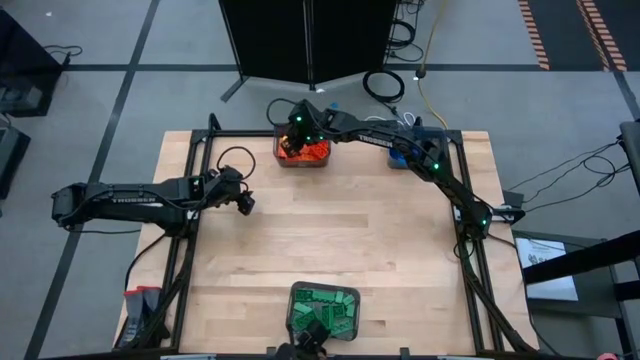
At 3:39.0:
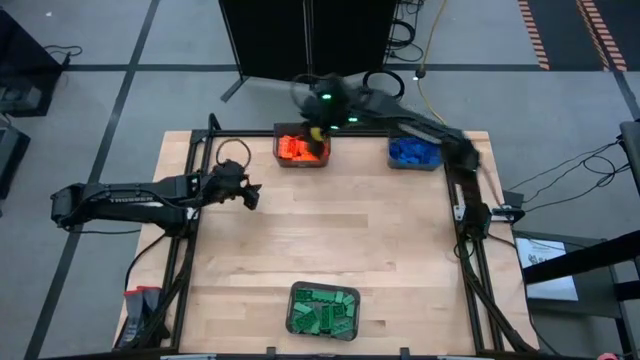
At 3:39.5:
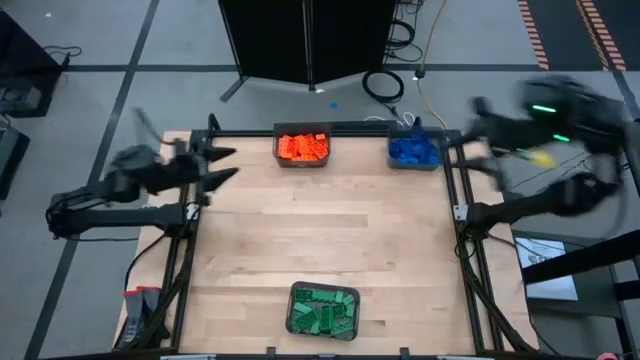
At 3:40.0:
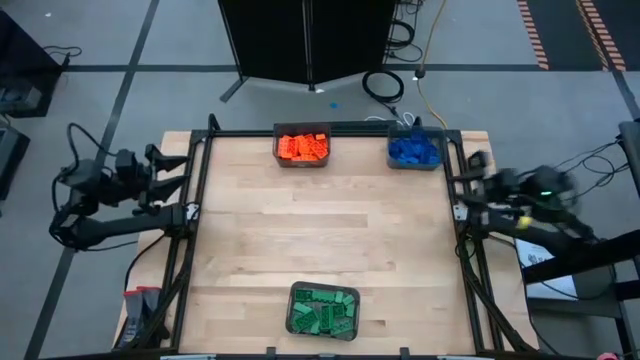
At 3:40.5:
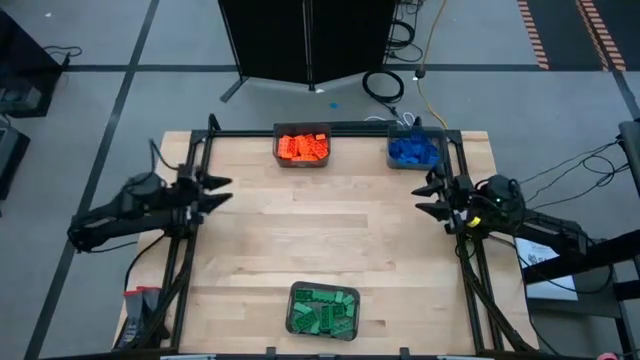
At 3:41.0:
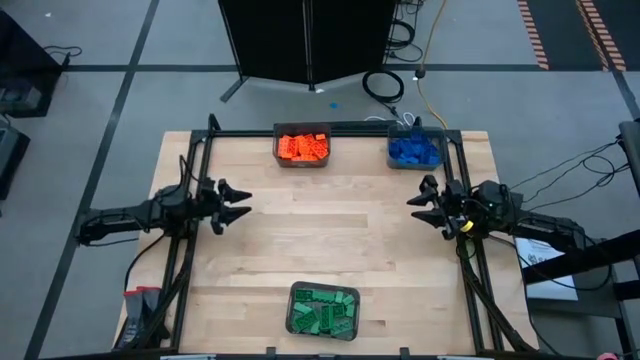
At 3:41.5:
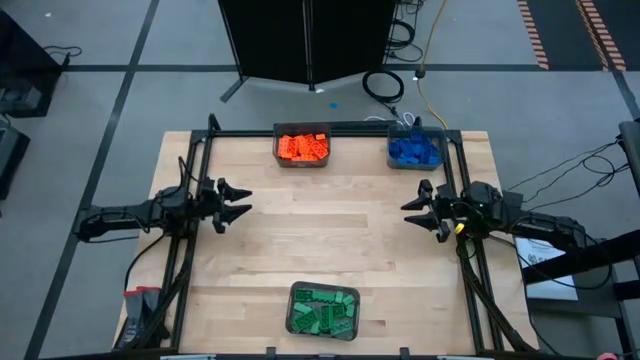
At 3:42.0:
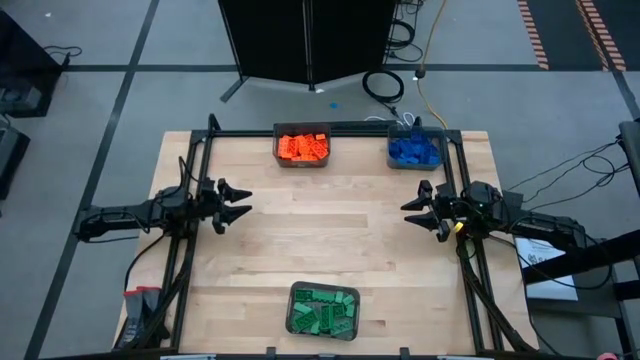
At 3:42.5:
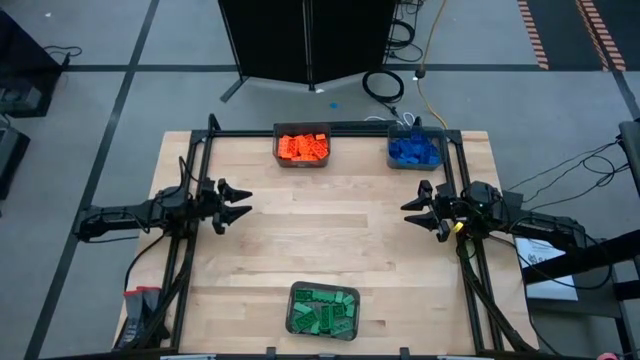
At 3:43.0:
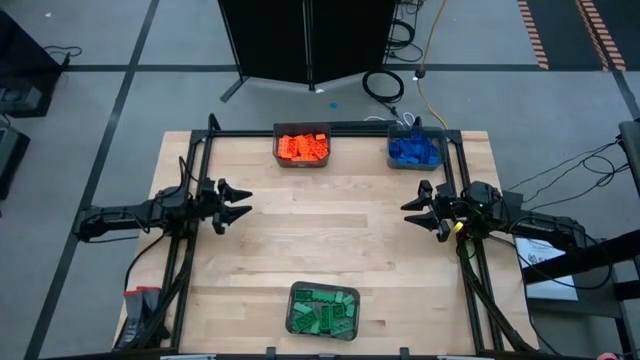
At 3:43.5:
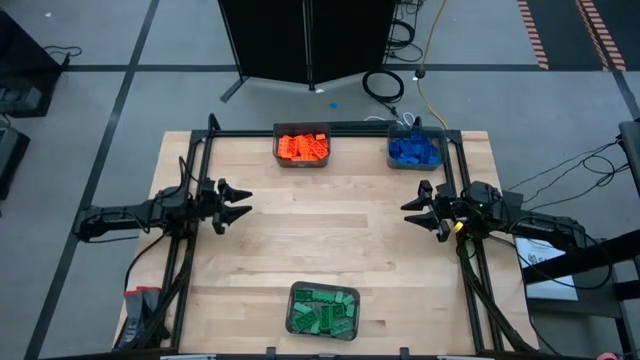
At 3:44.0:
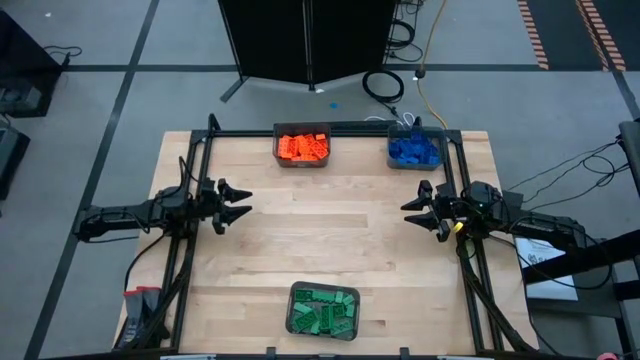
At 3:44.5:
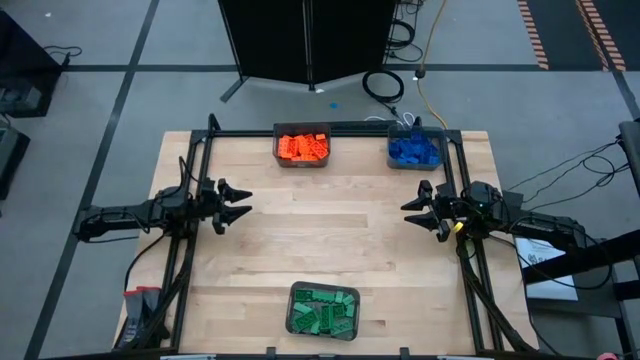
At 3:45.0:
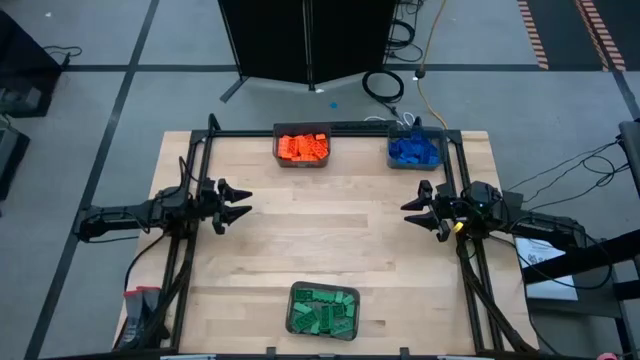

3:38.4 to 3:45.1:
Task: Sort blocks
Return to home position

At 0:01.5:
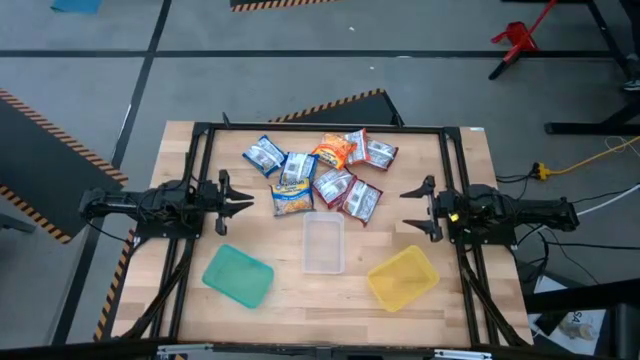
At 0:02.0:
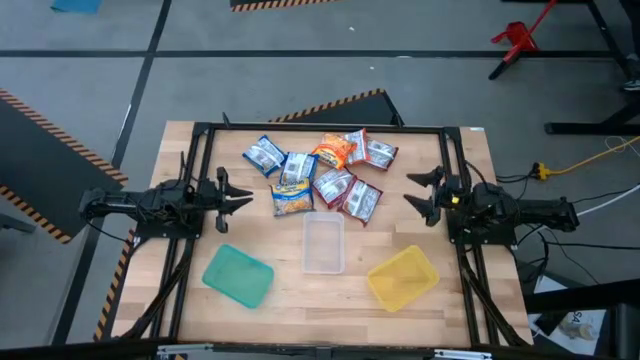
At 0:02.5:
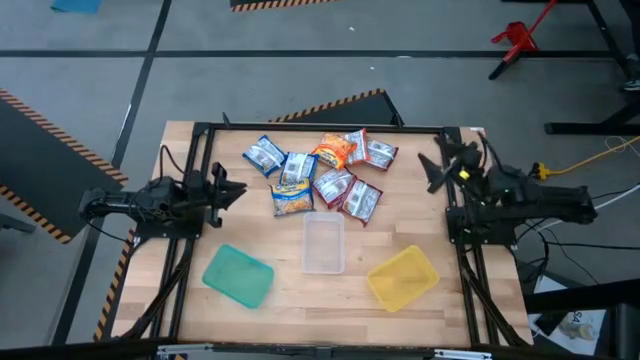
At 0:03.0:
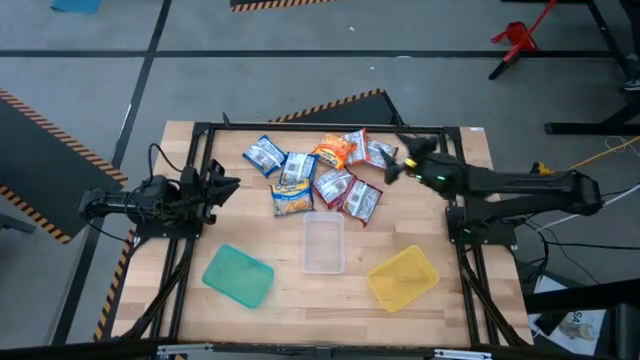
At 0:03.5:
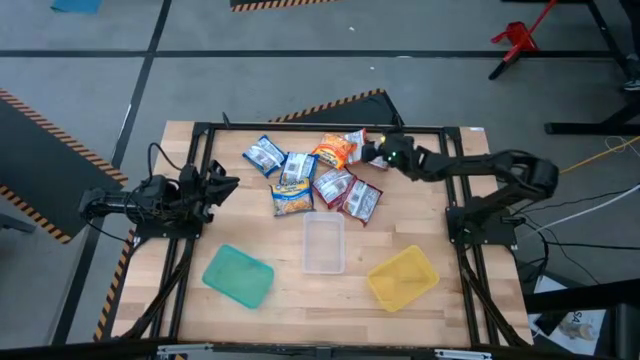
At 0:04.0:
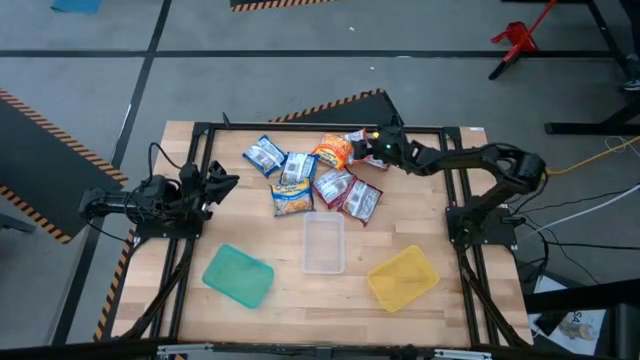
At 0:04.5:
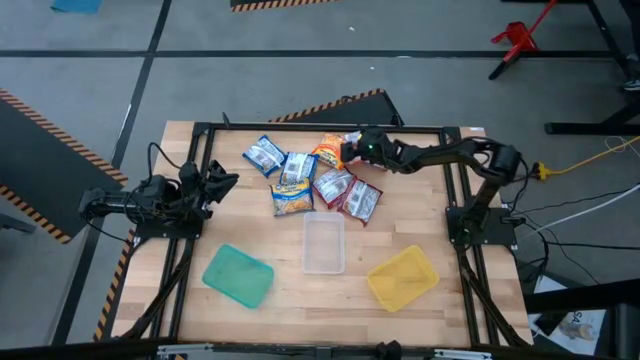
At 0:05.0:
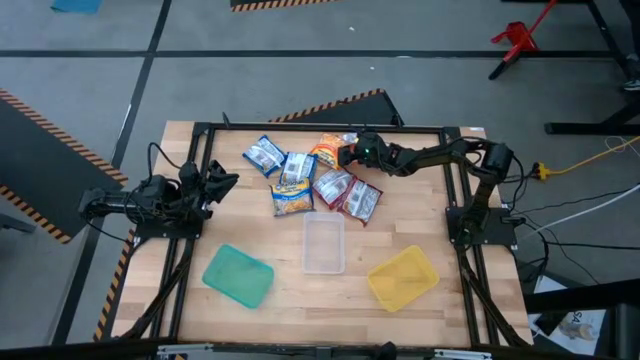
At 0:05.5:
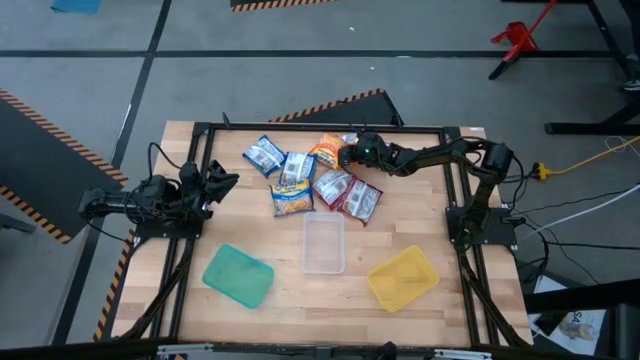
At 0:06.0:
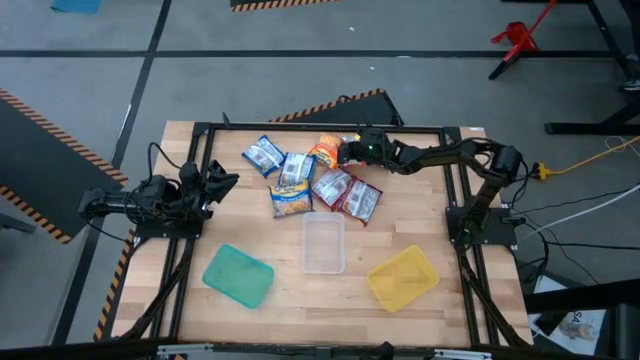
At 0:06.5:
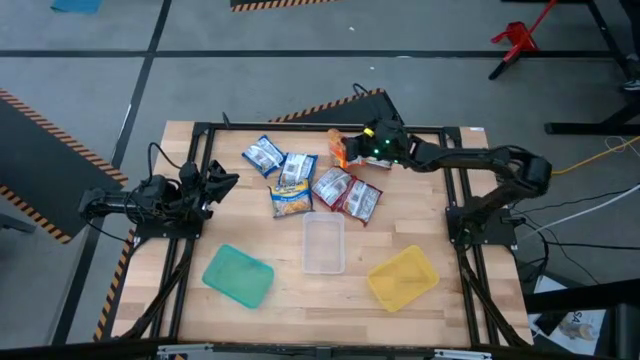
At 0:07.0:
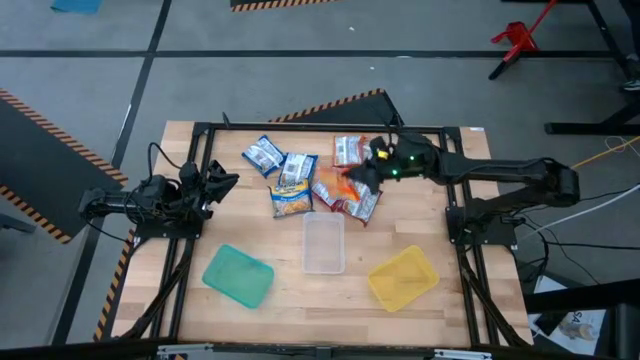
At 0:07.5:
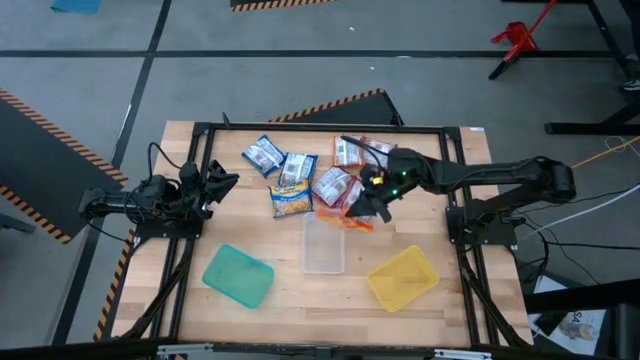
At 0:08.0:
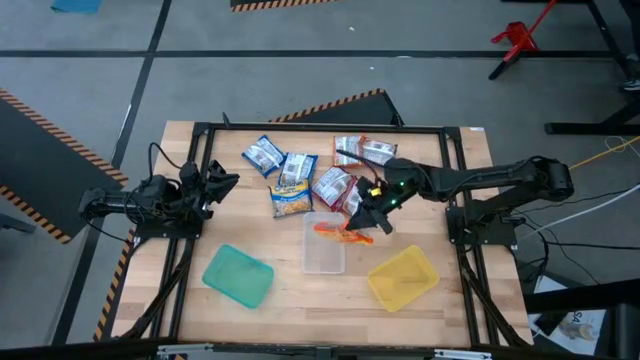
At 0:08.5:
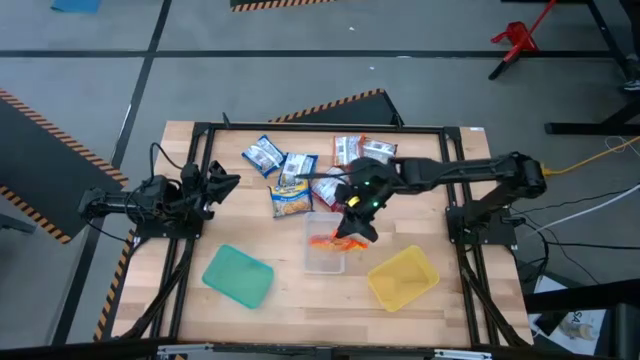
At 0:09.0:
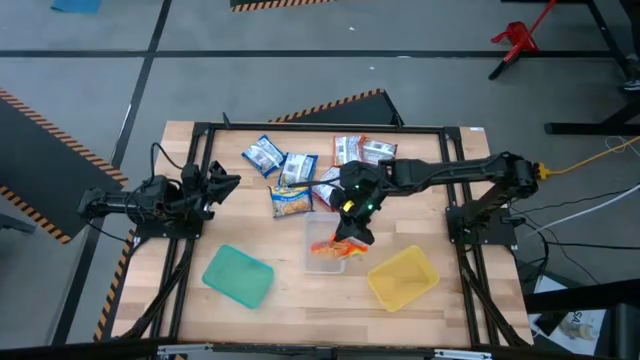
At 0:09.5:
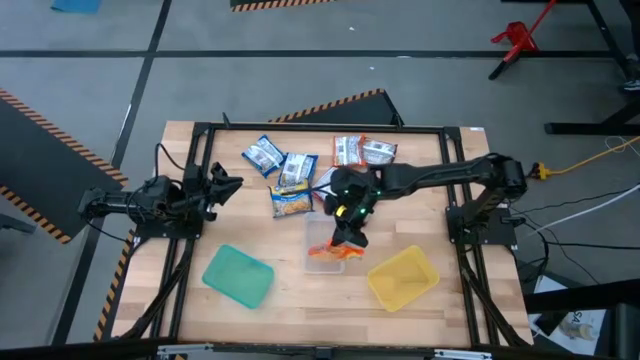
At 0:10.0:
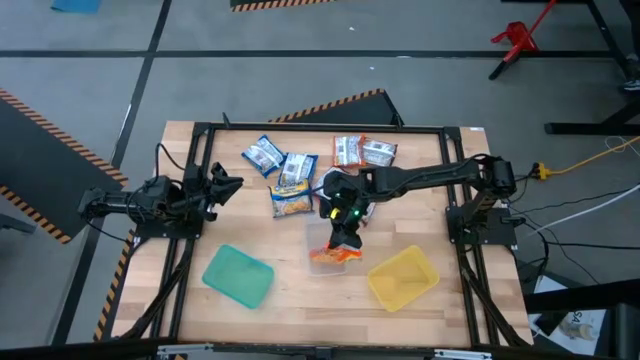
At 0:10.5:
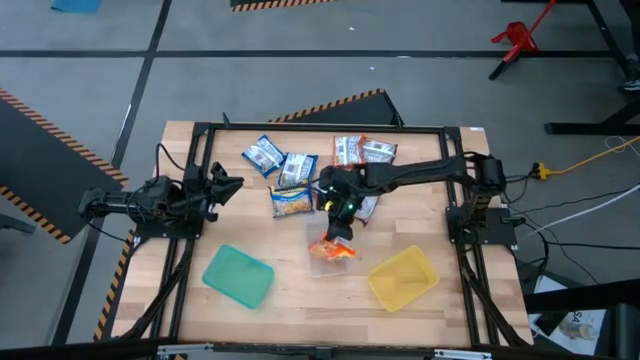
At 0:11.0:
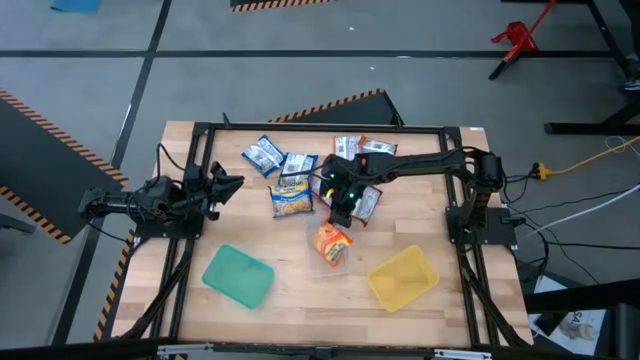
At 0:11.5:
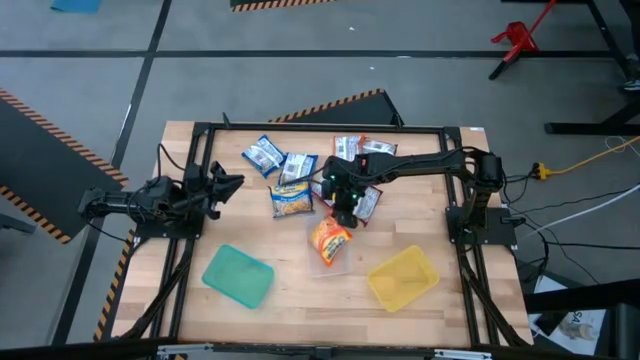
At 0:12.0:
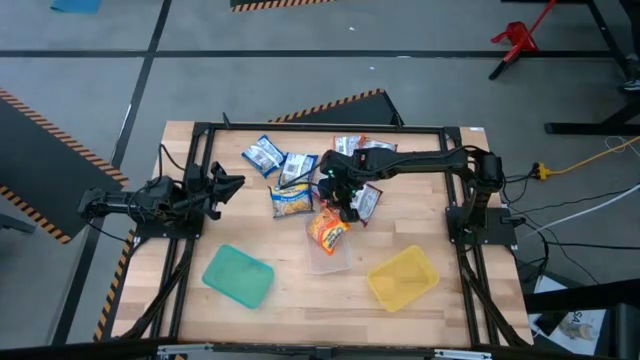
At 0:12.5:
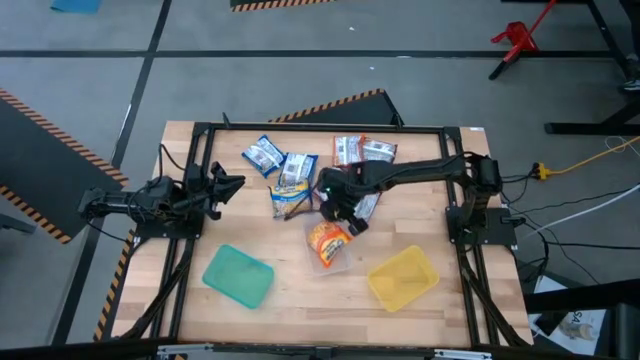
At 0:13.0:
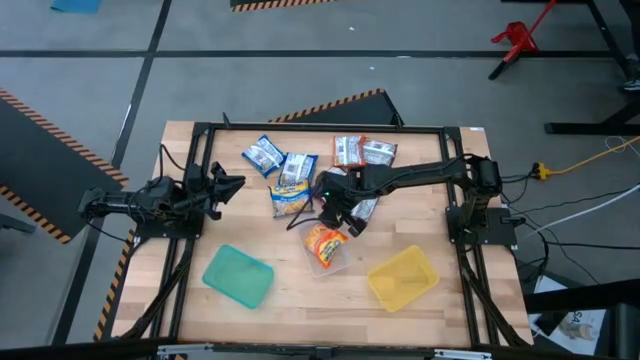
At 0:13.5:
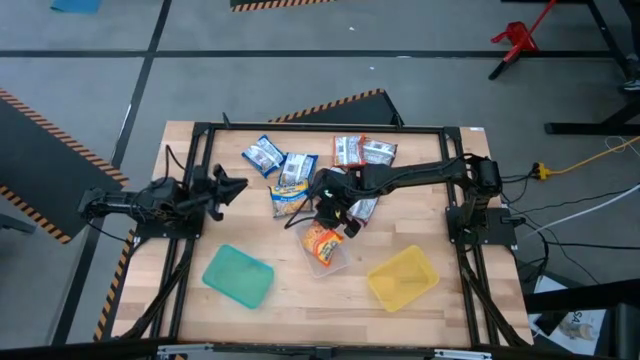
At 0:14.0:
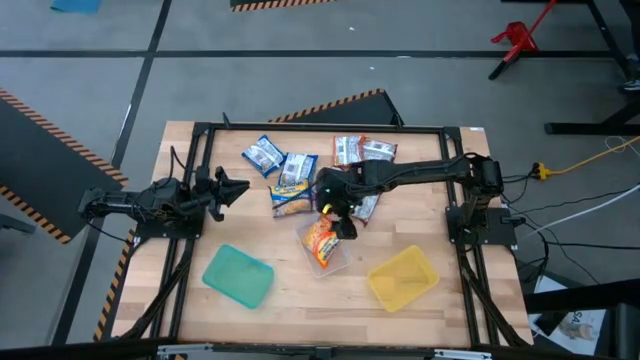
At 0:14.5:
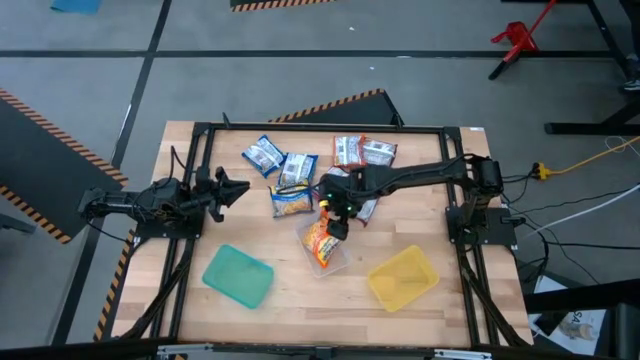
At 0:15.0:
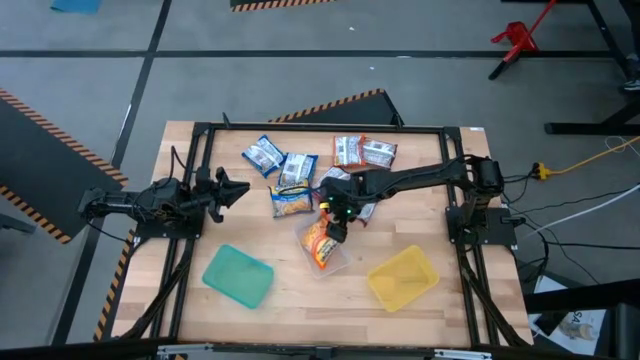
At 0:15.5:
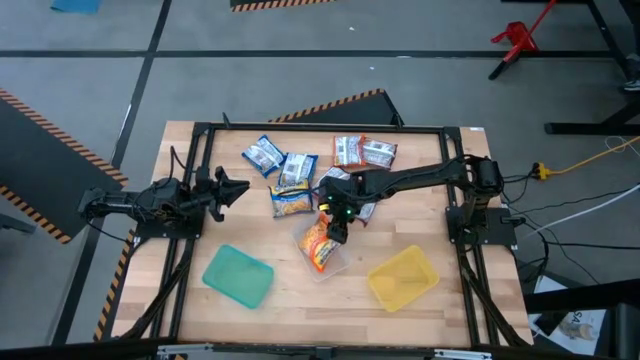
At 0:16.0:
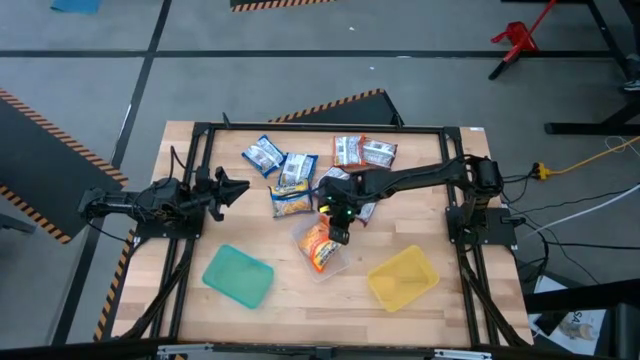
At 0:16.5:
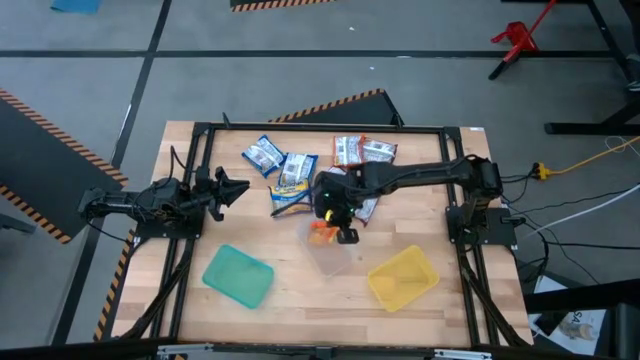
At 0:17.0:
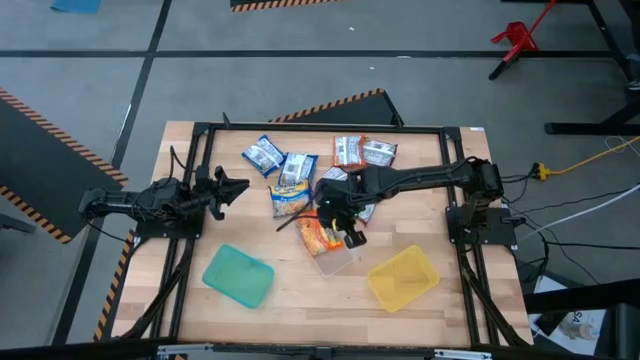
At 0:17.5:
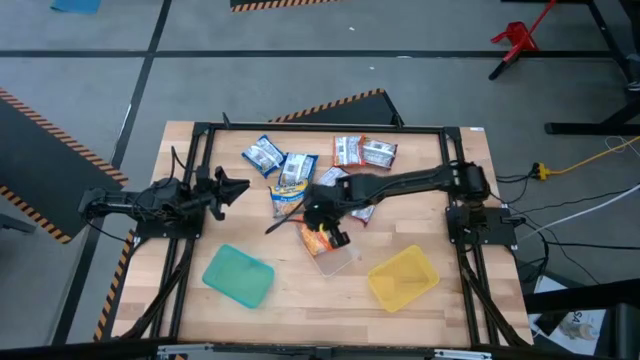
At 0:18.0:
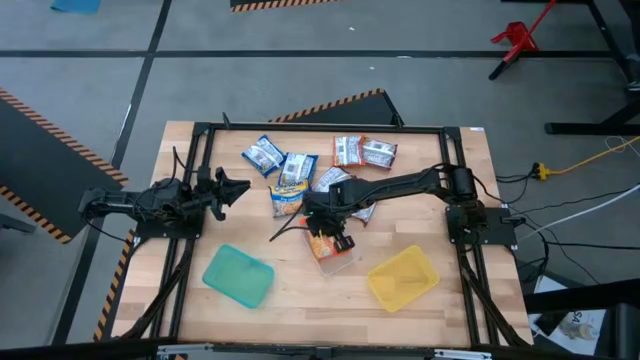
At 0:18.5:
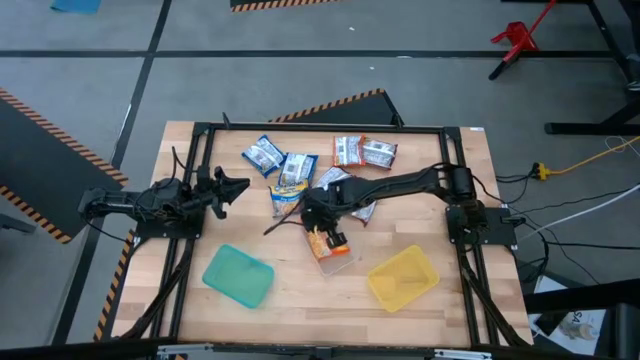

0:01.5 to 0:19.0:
Task: Sort Maruchan noodles
Put the left orange noodle pack into the transparent bin
